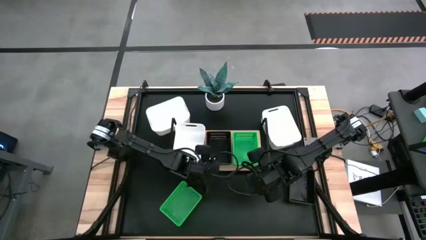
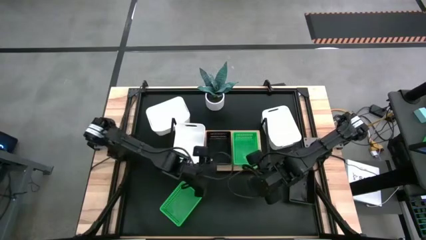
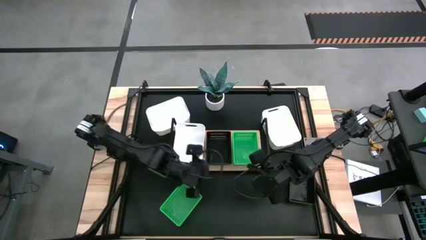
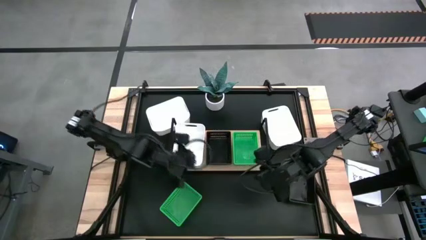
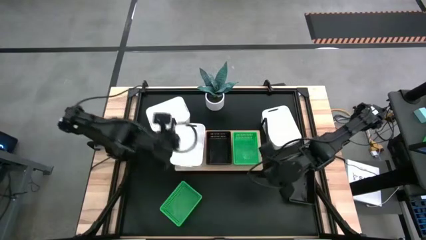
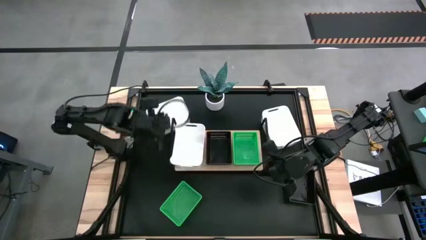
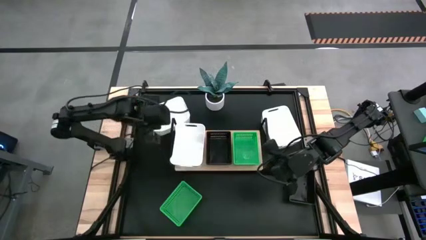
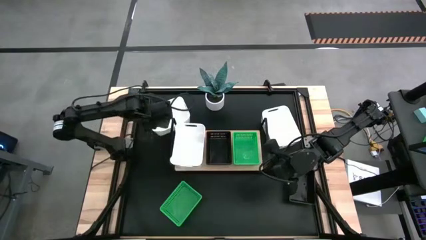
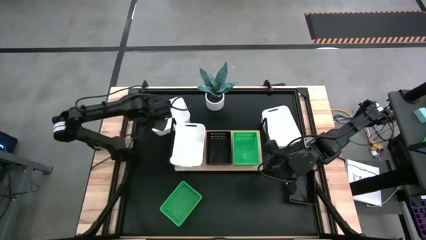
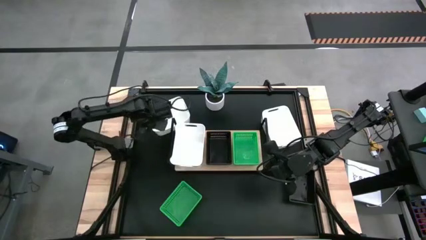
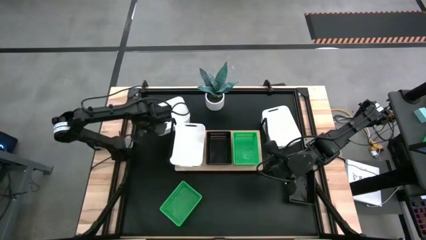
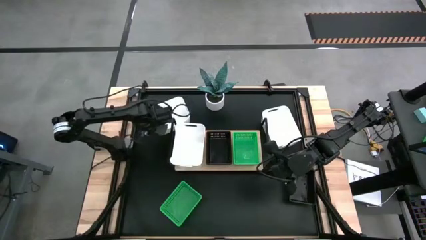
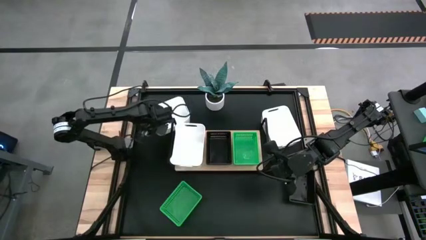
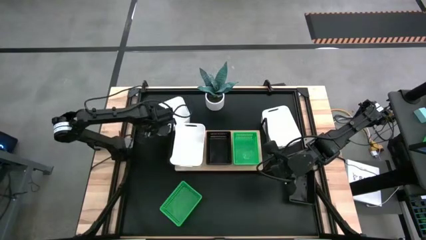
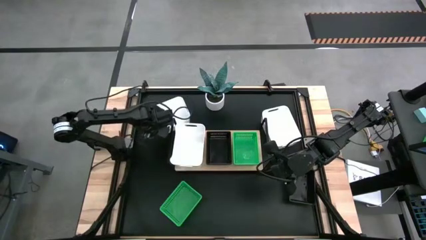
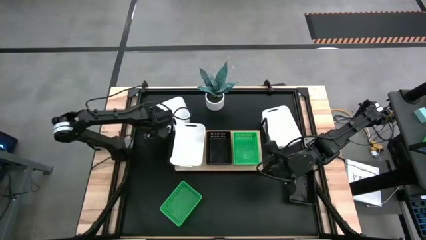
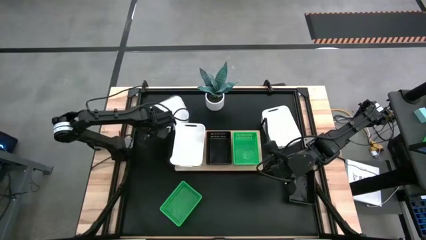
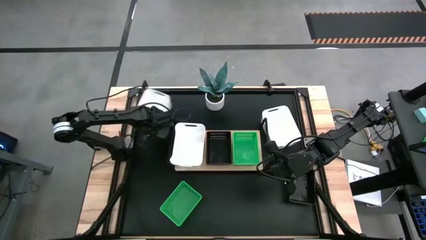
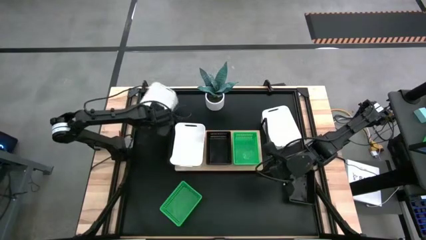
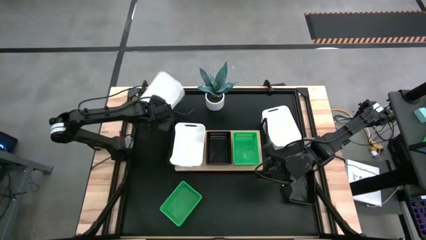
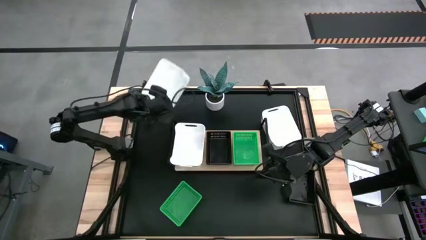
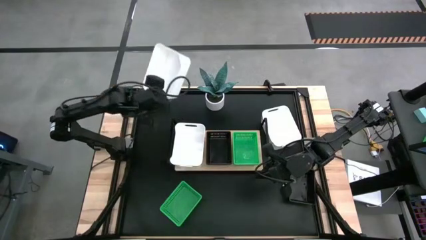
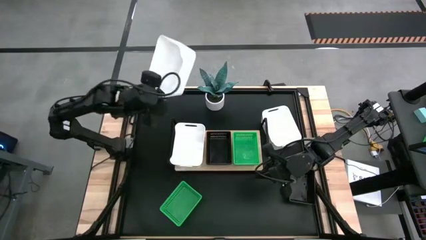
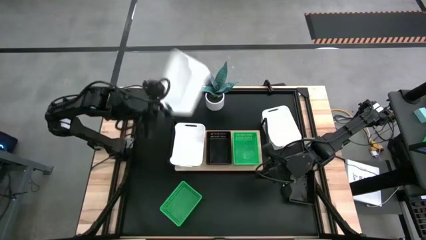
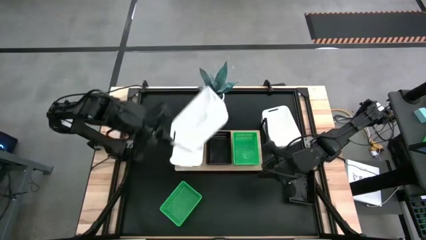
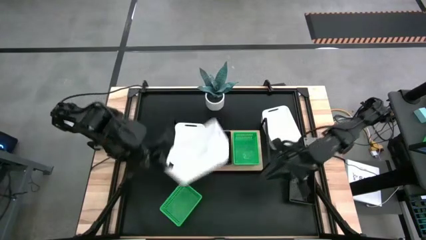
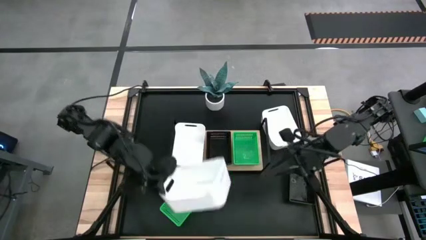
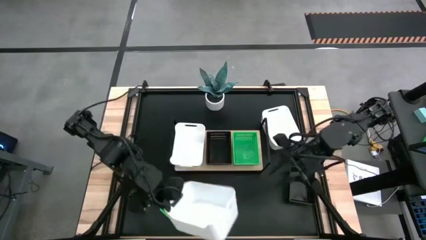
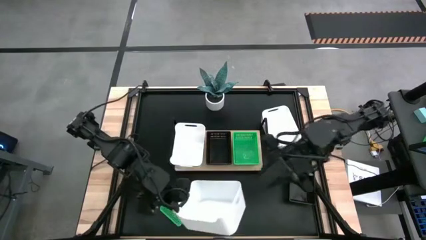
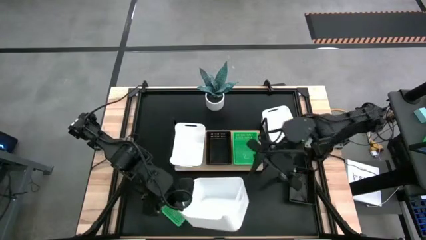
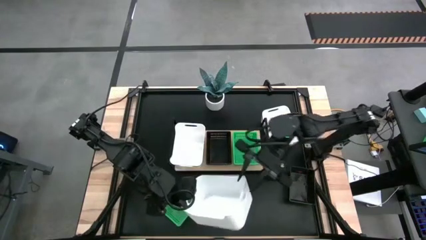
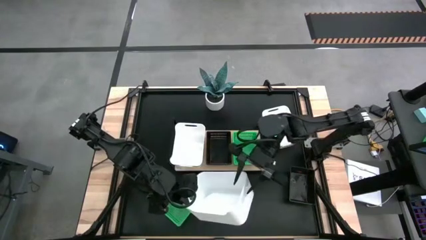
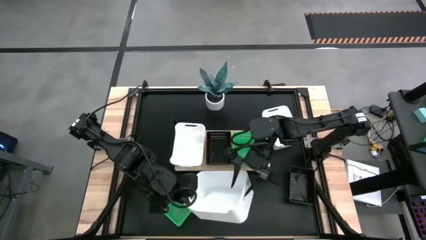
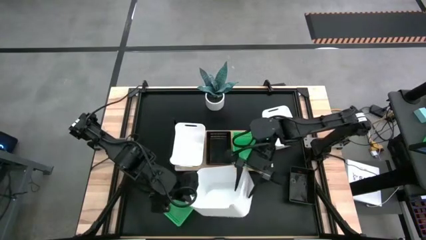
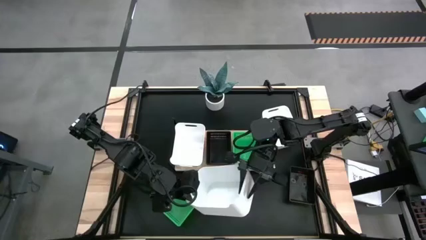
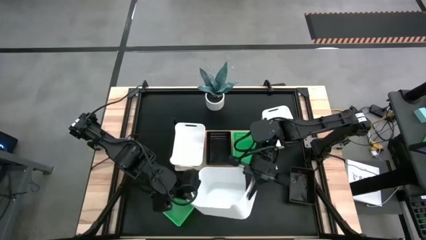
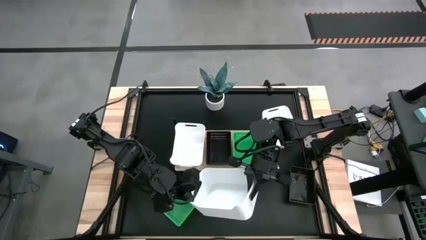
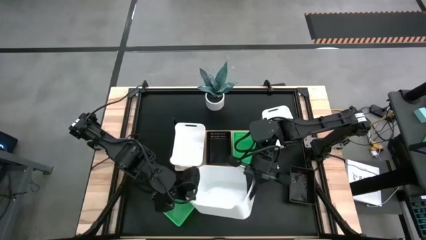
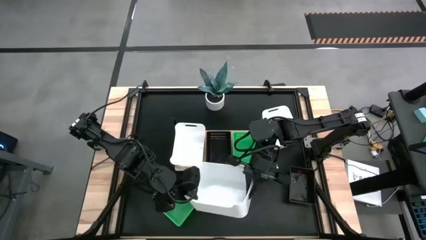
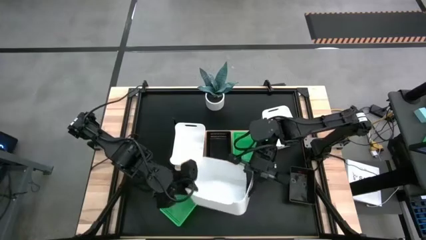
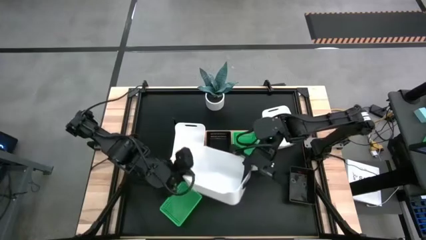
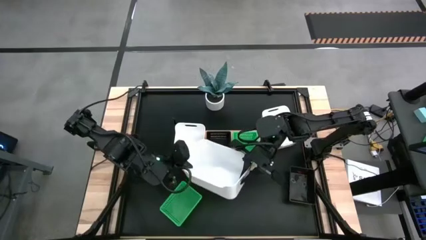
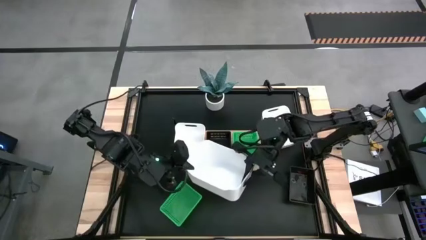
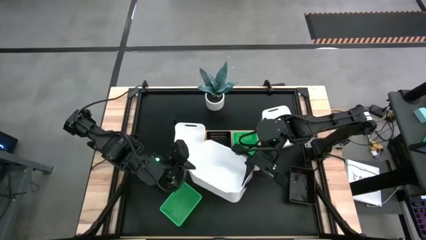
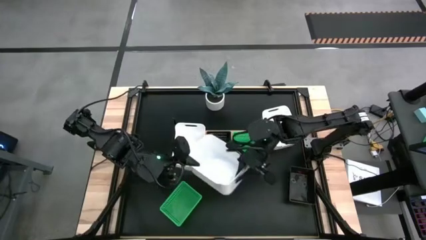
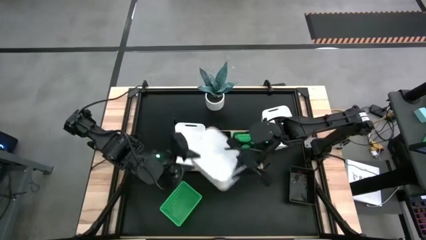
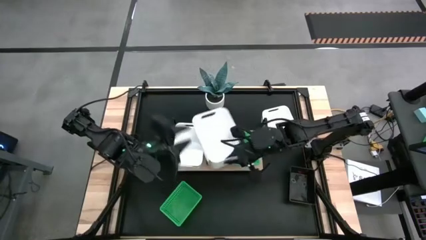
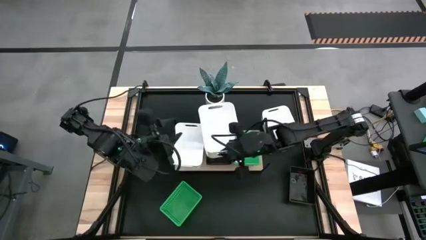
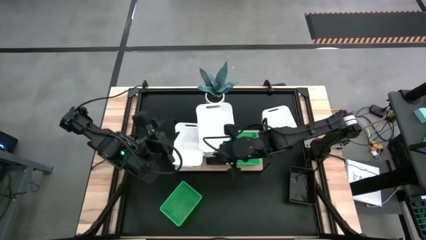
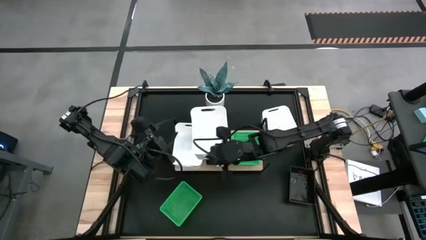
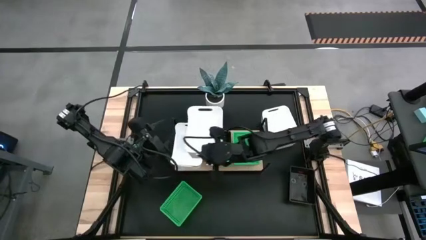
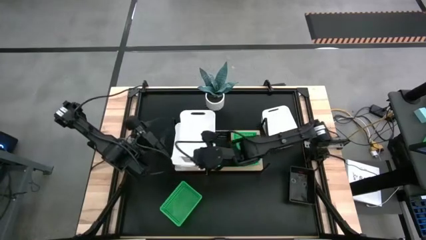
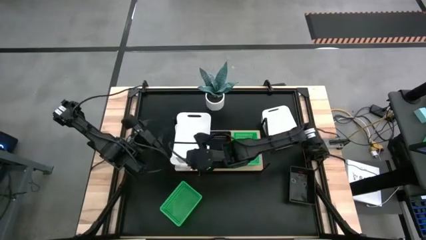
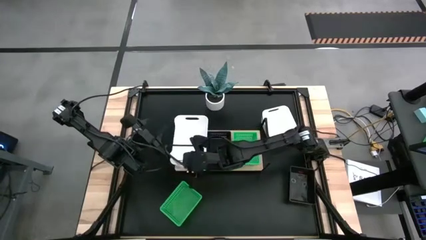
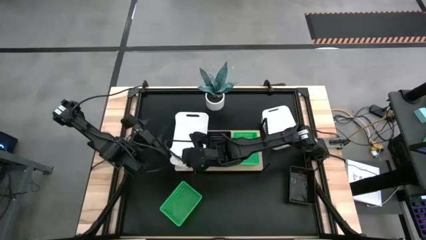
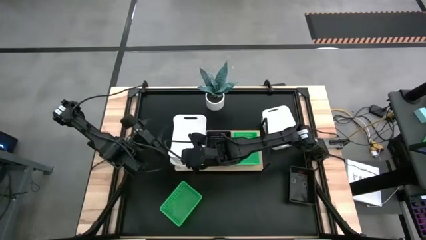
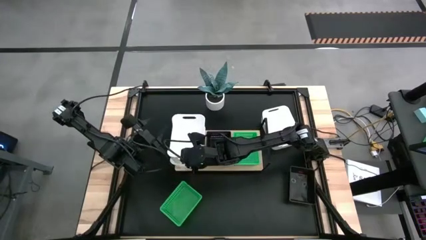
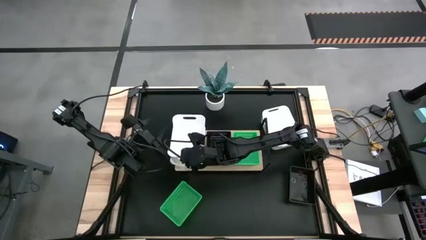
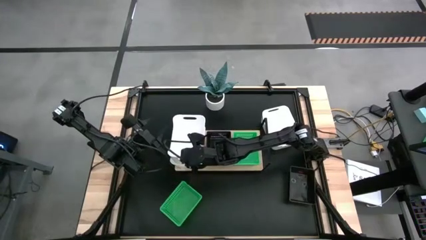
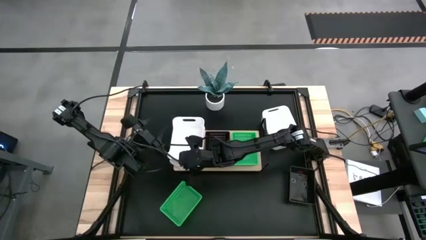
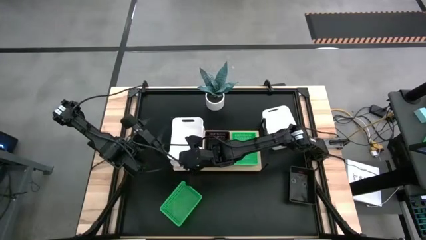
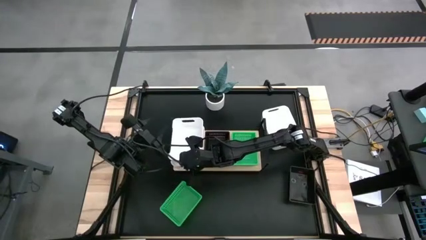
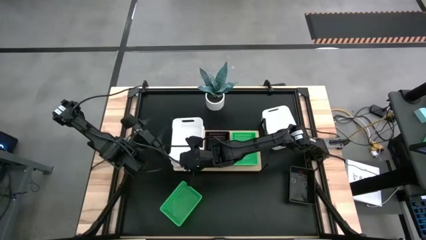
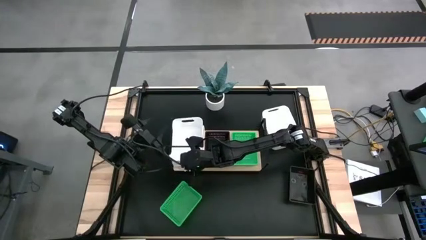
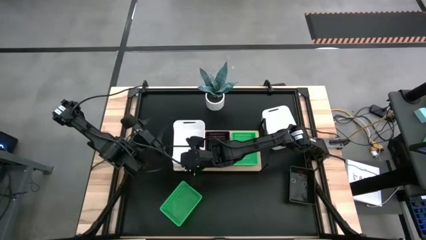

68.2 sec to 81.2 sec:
Task: Stack baskets on shelf by color
Stack the left white bin on top of the other white bin on the shelf

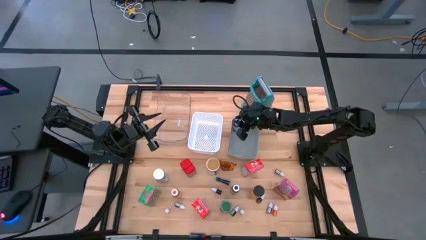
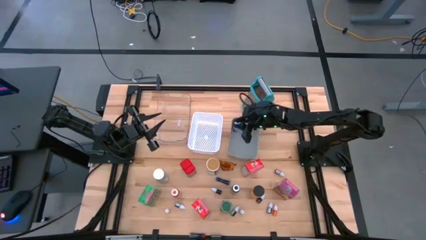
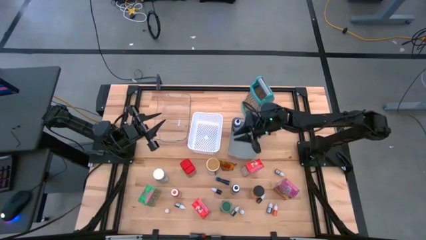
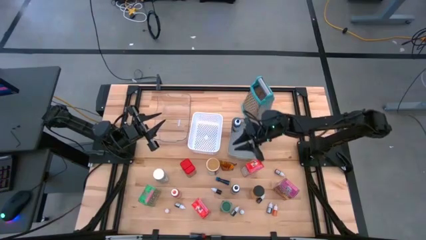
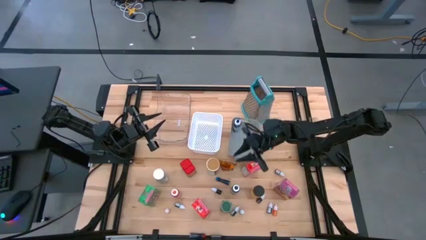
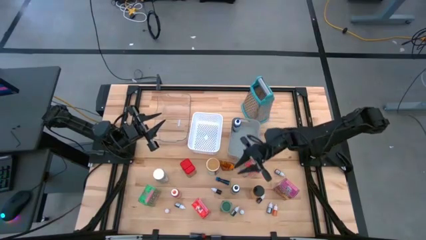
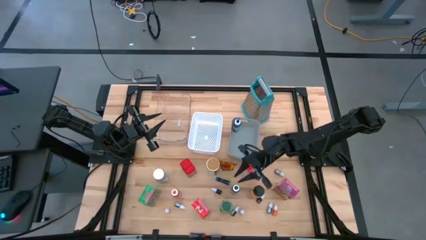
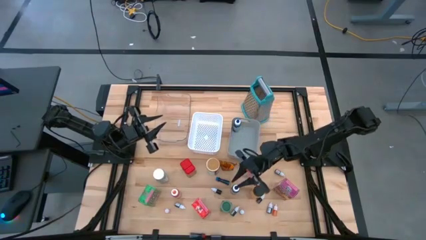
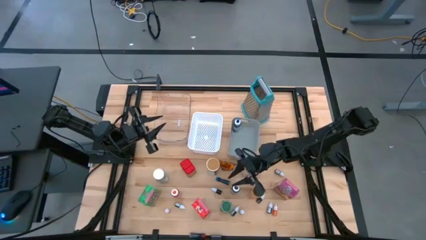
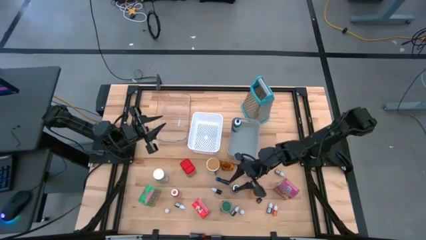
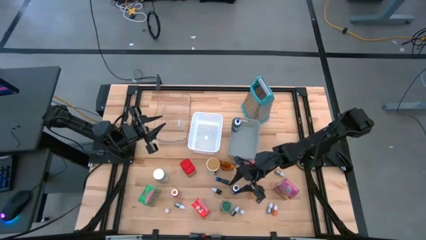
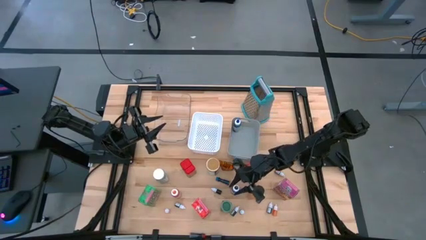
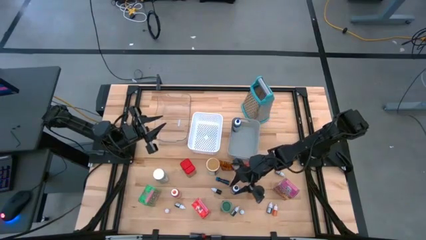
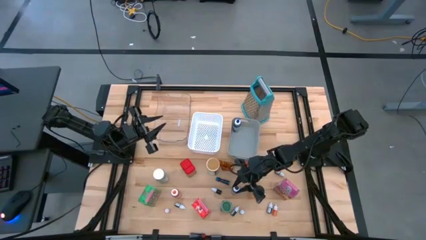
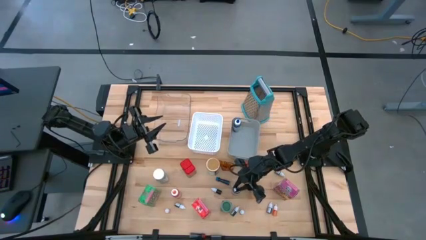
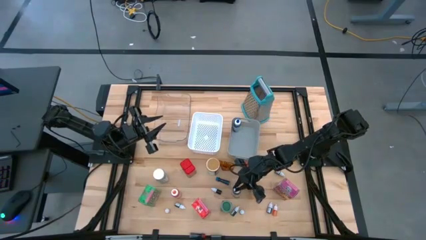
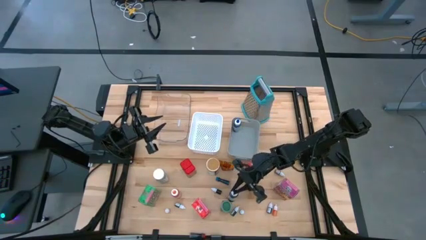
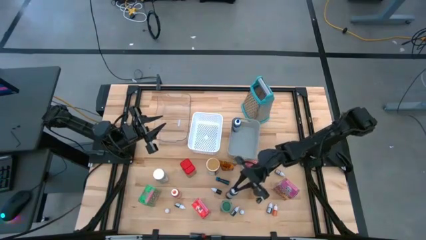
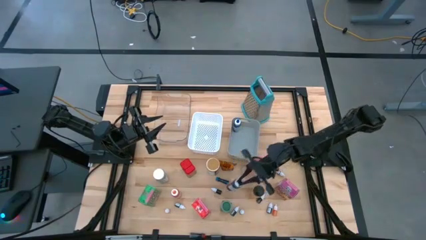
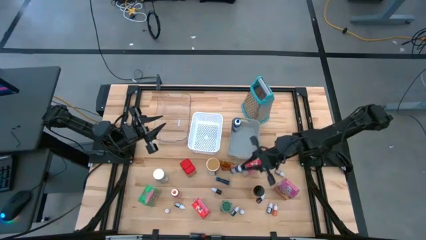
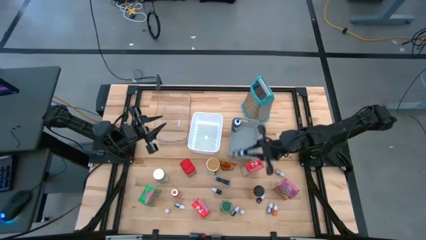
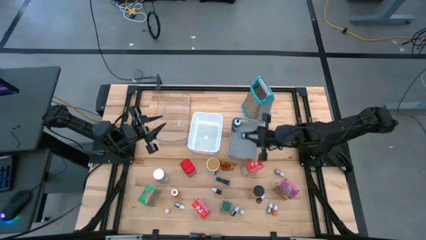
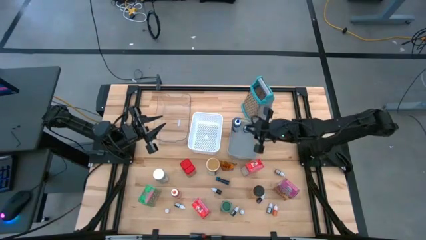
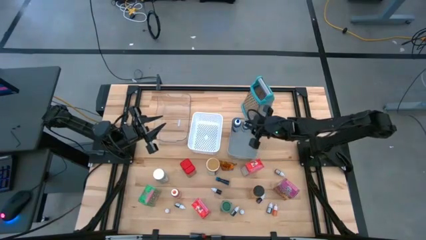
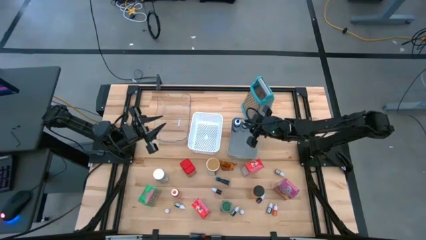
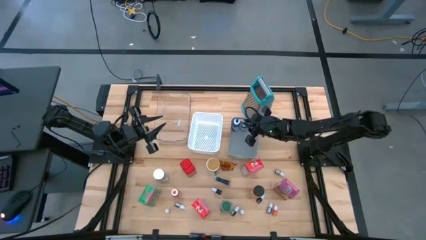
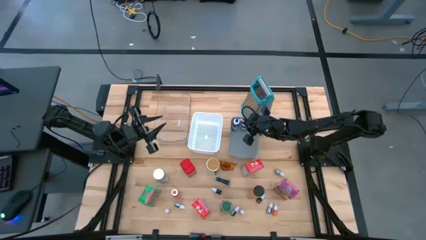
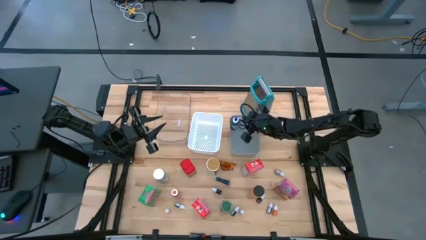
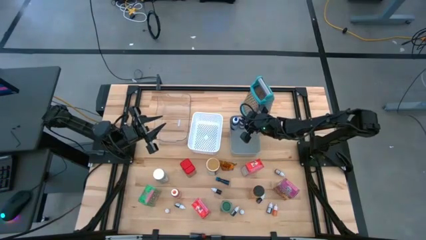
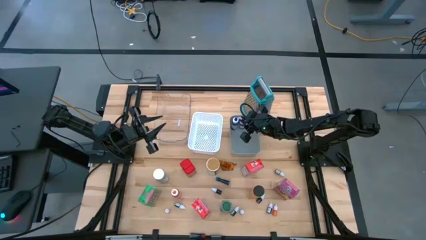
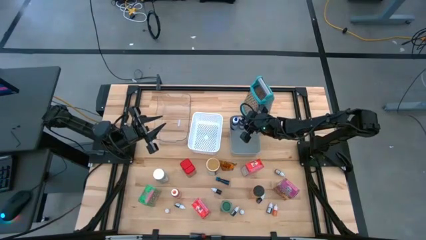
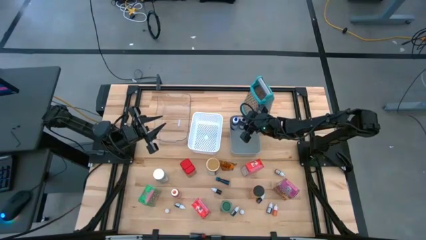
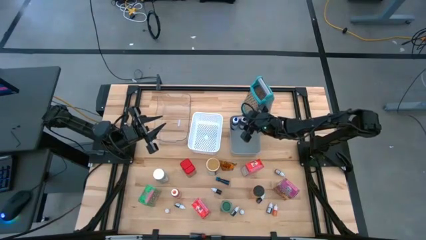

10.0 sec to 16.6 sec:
Task: Pick & Place Kitchen Items
Put the large black food coloring into the gray bin
